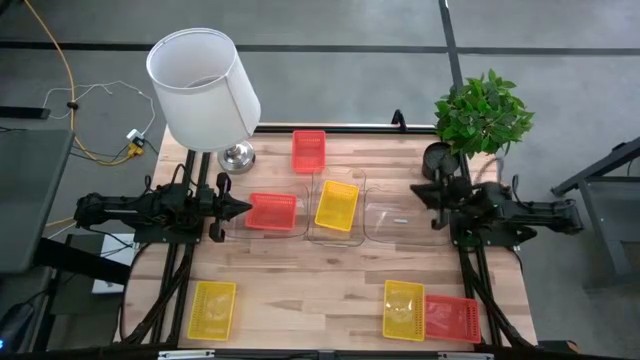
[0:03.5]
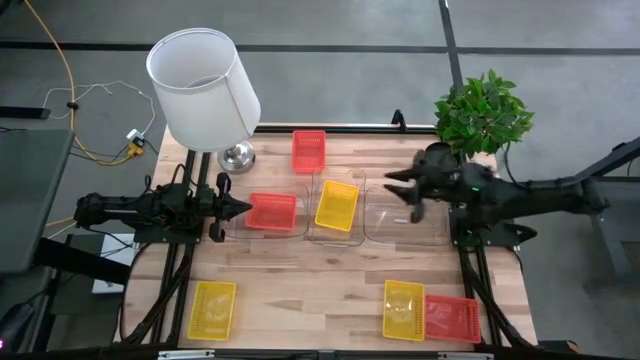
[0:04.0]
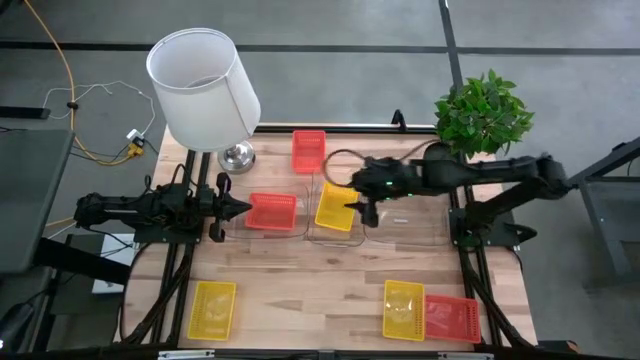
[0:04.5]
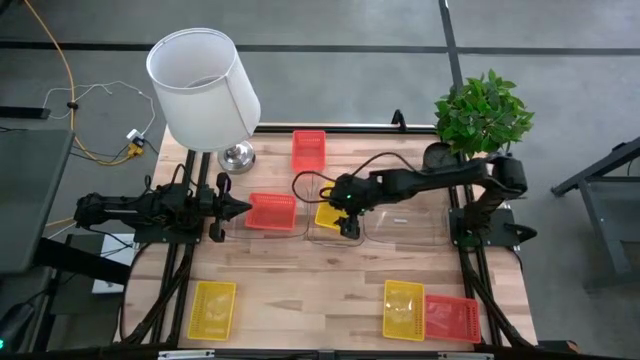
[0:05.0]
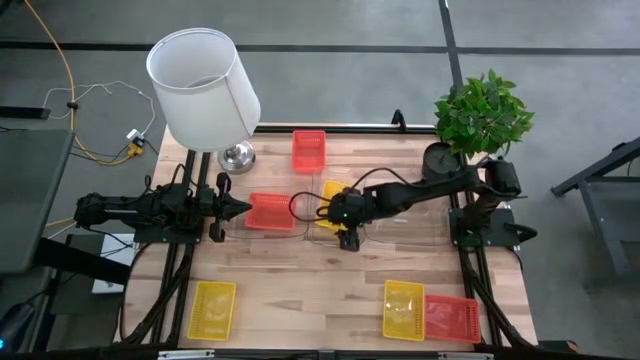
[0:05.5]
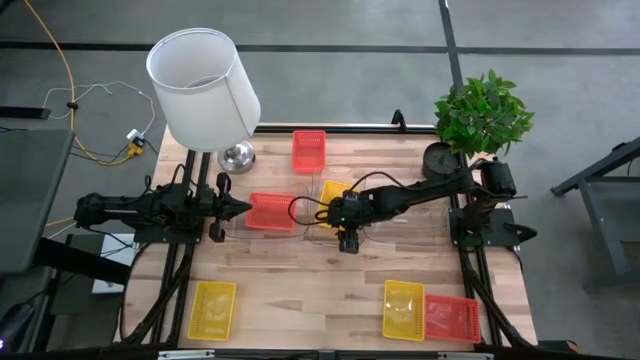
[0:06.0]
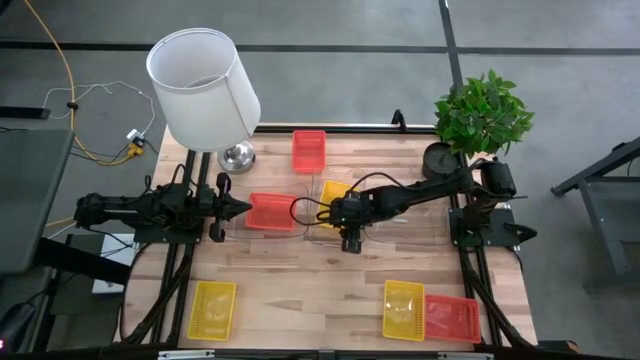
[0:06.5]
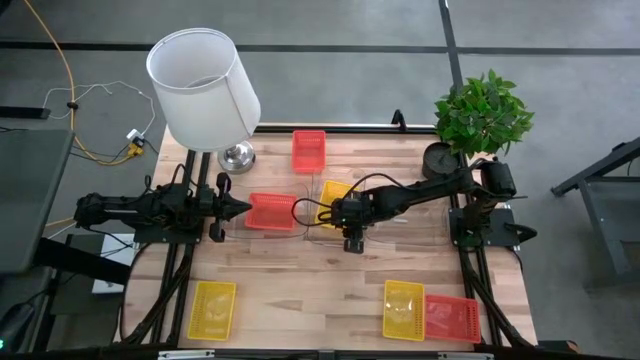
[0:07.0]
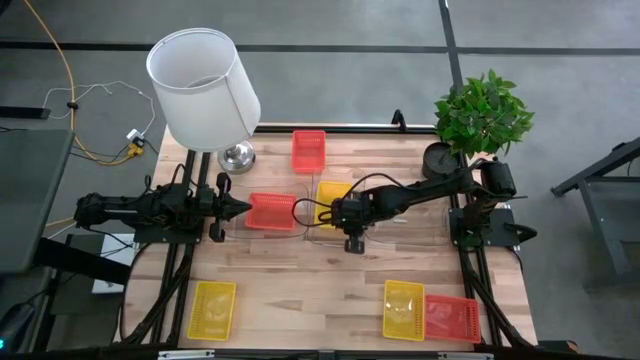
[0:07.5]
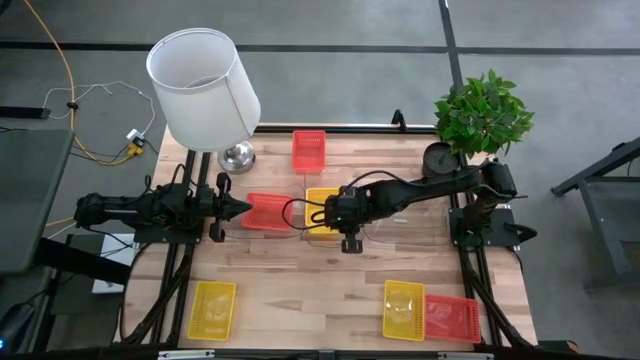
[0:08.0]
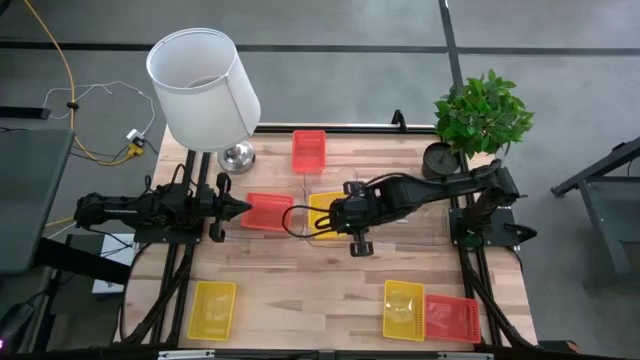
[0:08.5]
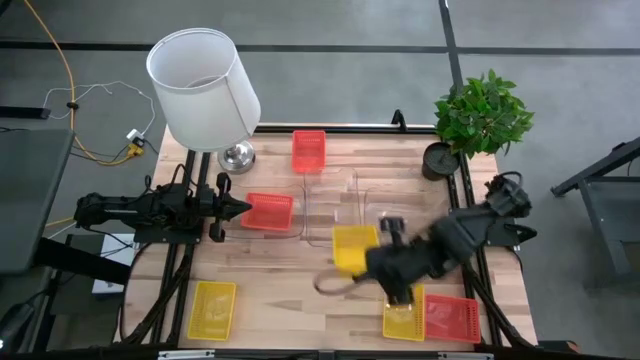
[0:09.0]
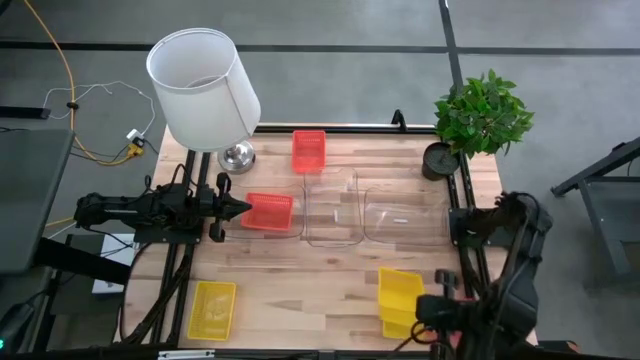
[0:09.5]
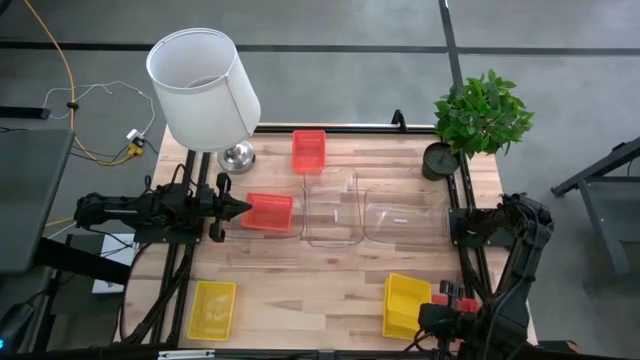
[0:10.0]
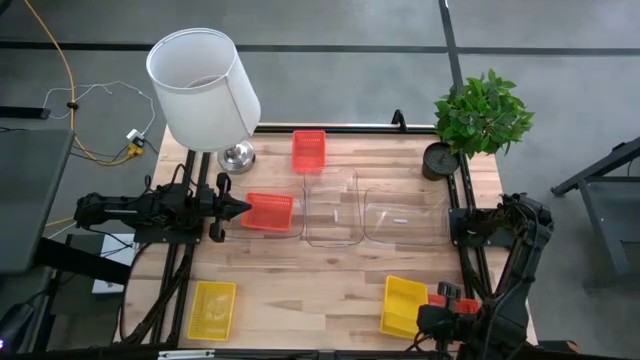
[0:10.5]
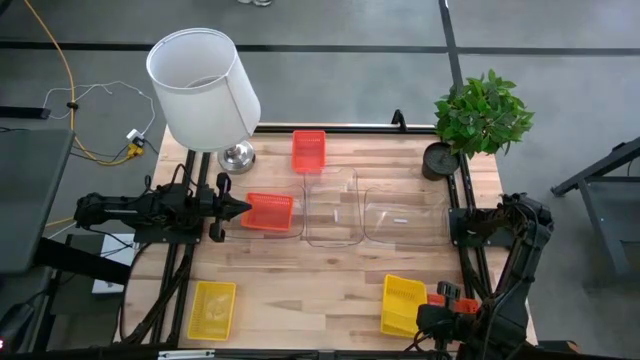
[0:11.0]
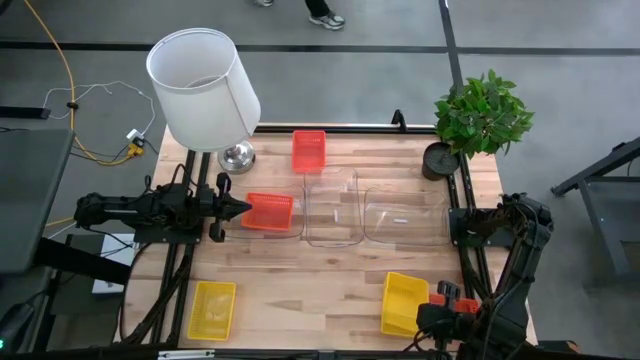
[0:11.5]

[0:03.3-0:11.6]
Stack the top yellow bin on the bottom right yellow bin

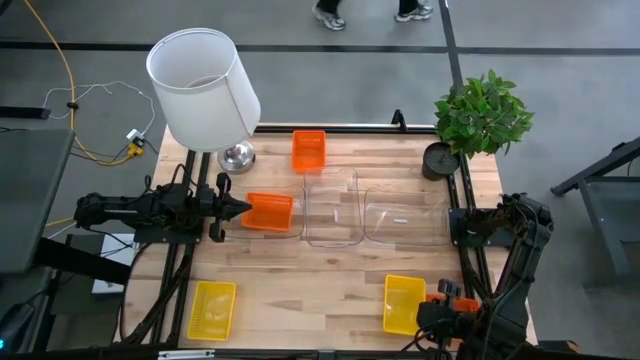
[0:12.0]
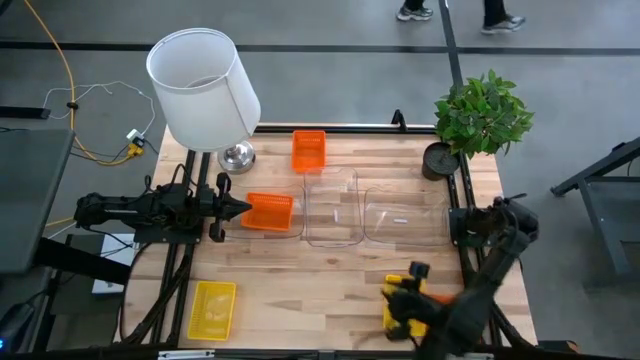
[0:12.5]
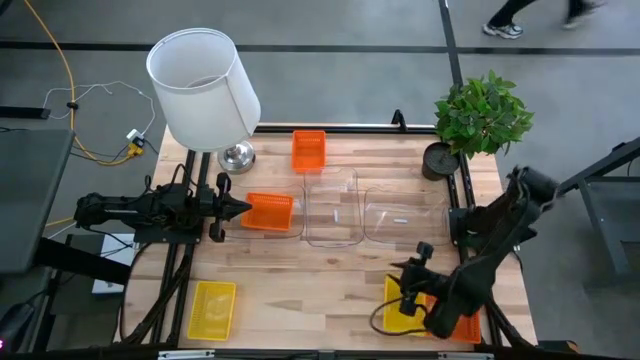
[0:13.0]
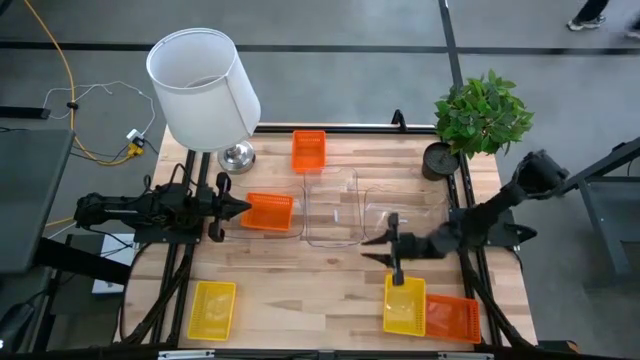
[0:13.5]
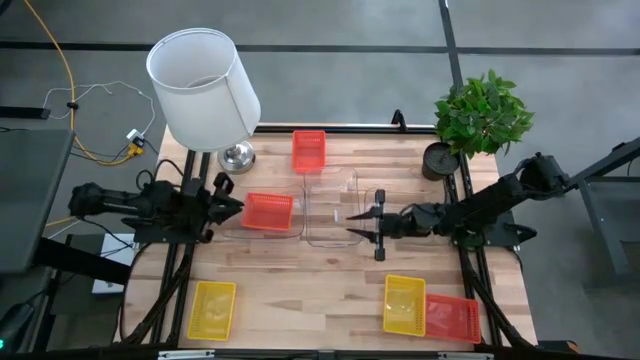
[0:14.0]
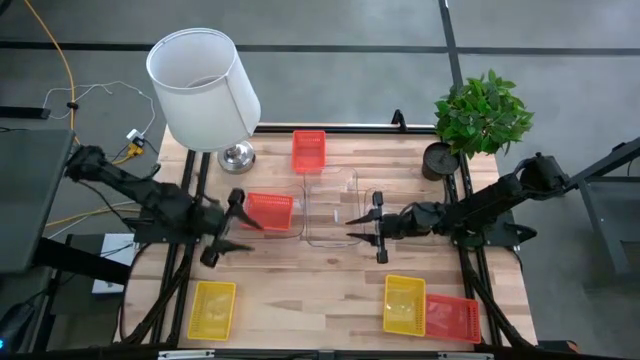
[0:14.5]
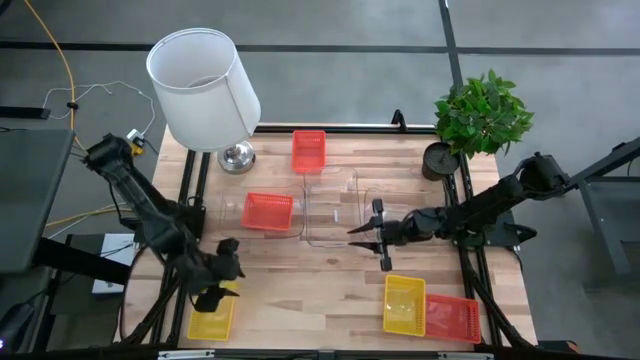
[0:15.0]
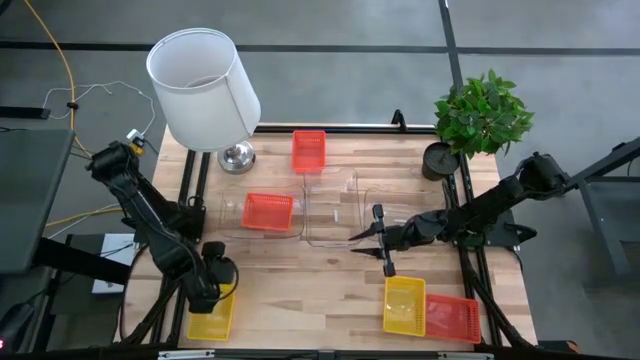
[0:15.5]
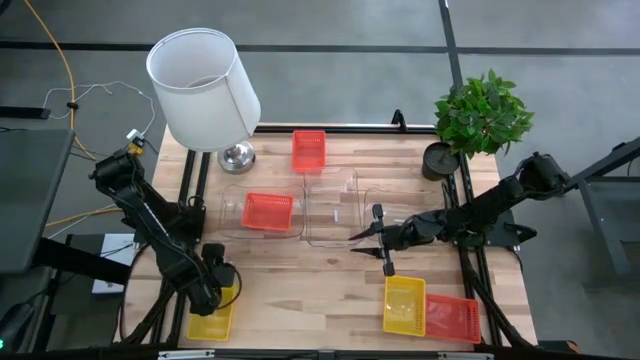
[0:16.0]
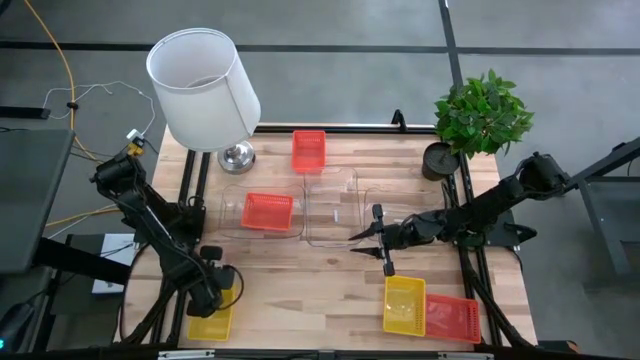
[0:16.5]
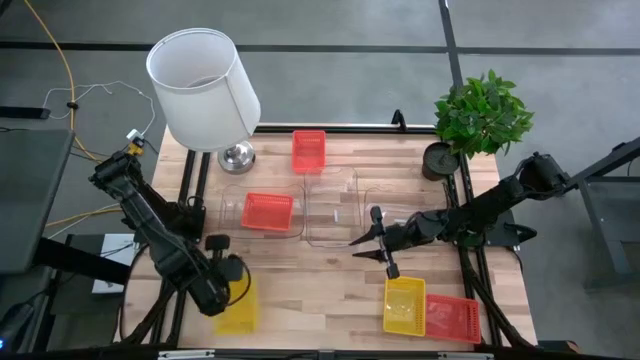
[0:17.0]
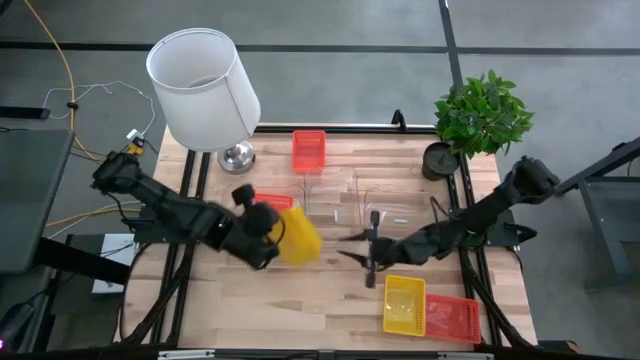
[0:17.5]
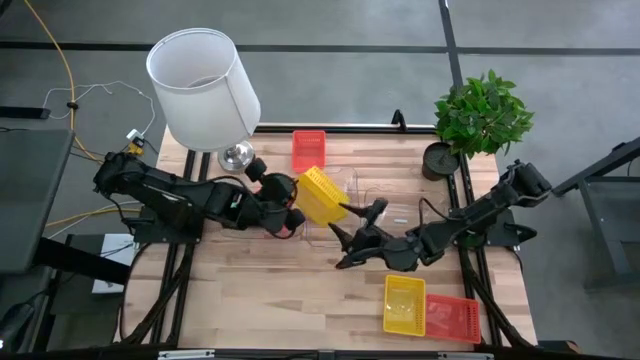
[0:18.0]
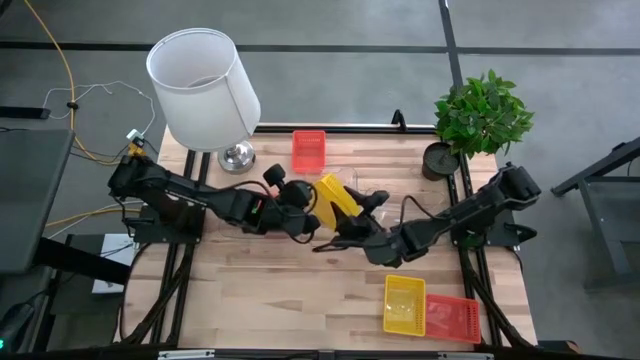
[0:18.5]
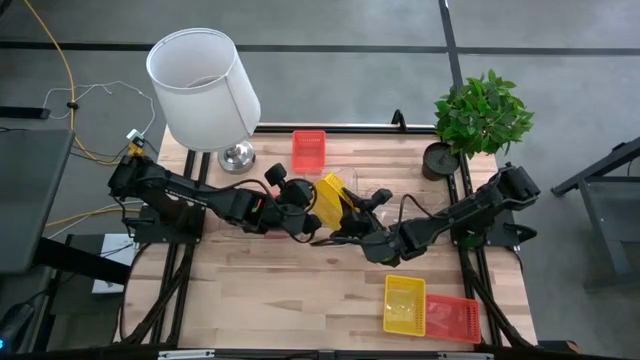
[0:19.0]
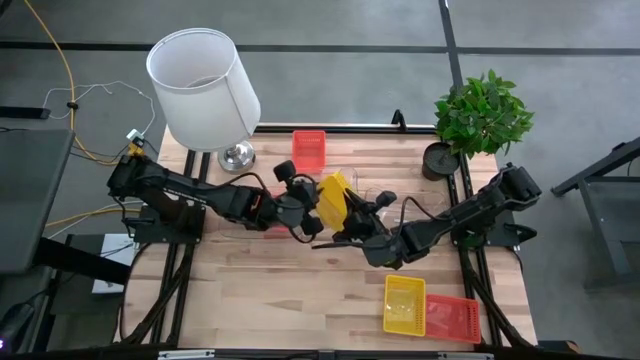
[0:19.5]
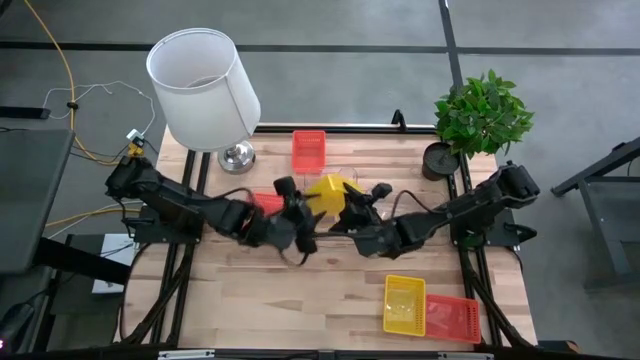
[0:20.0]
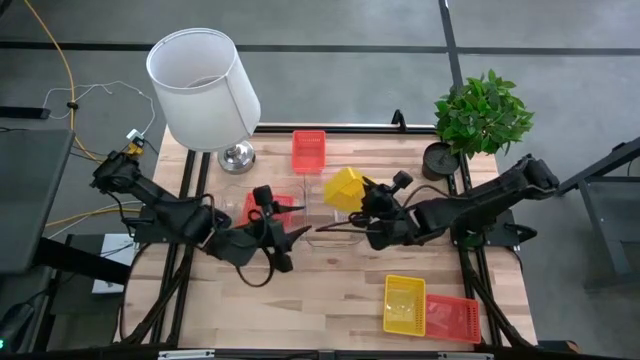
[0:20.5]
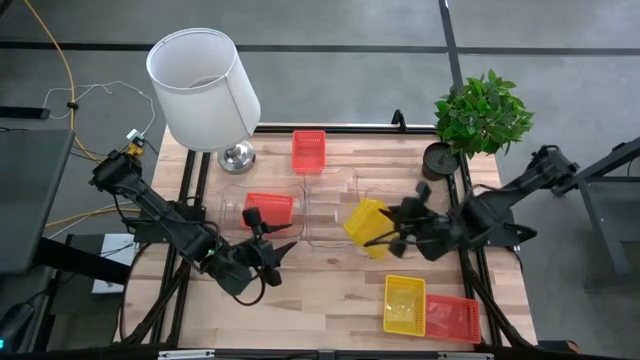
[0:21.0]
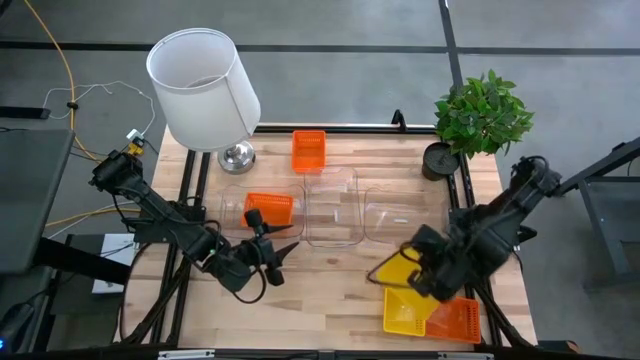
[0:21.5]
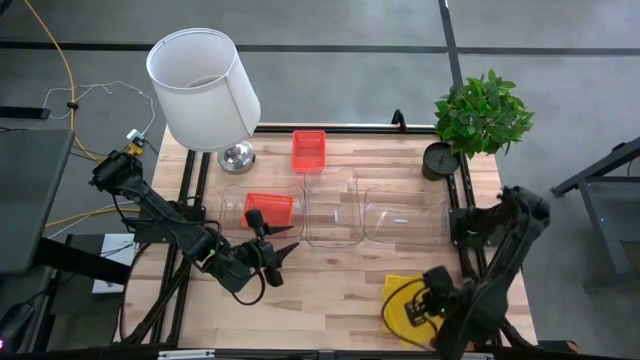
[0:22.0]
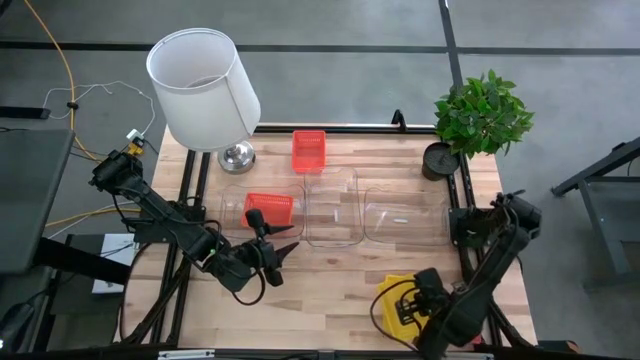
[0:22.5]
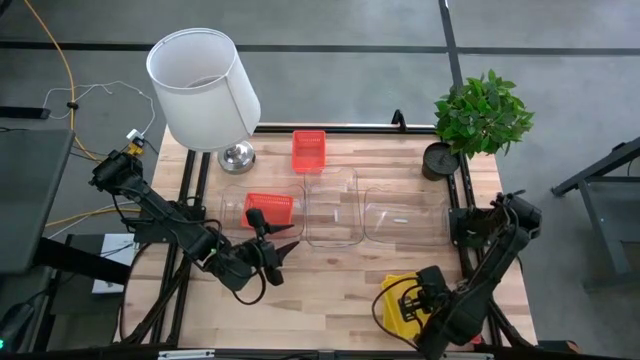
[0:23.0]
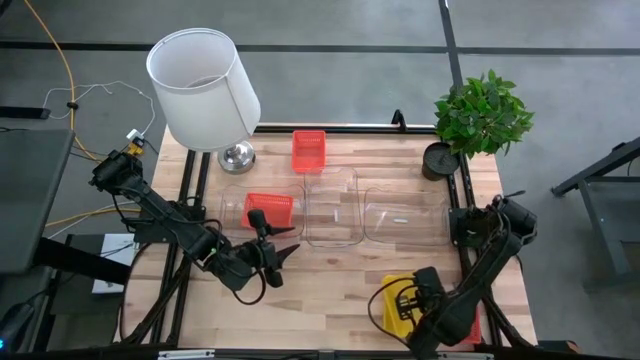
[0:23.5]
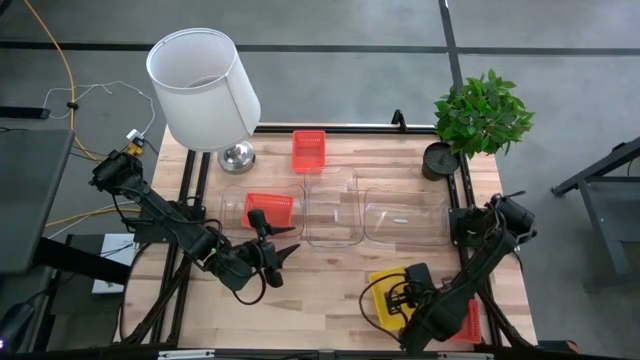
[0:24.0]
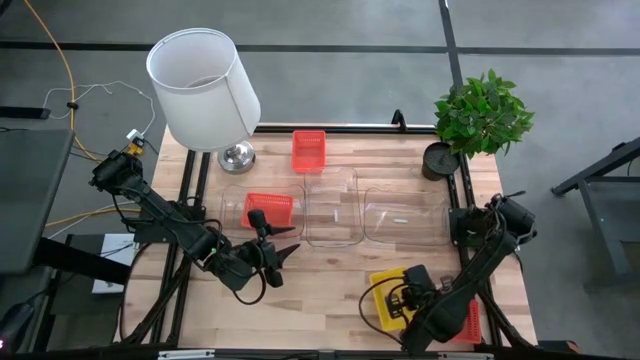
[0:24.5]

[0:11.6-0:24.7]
Stack the left yellow bin on the right yellow bins

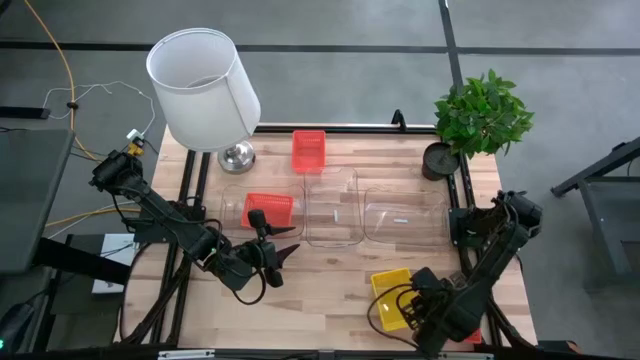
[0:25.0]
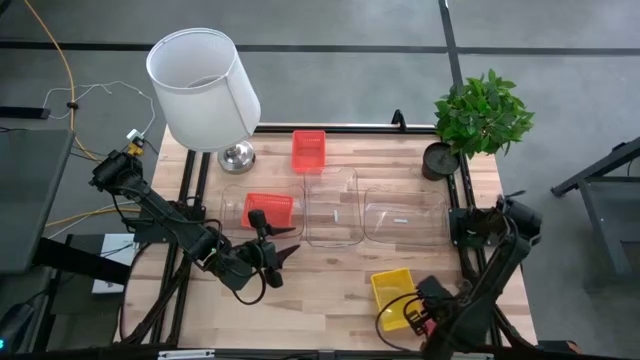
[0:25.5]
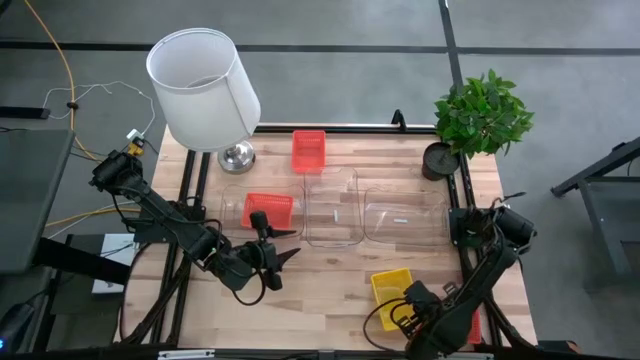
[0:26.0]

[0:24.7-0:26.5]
Adjust the stacked yellow bin
